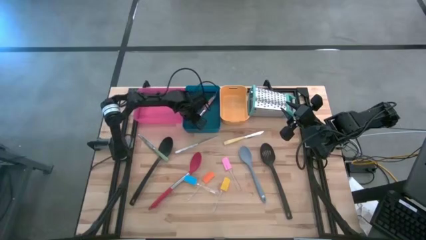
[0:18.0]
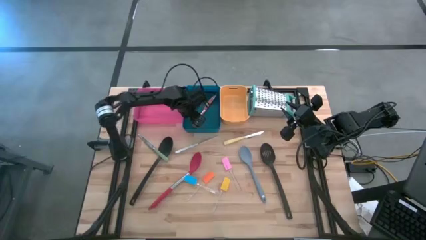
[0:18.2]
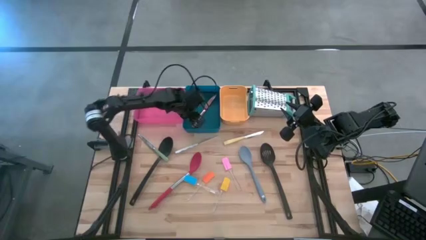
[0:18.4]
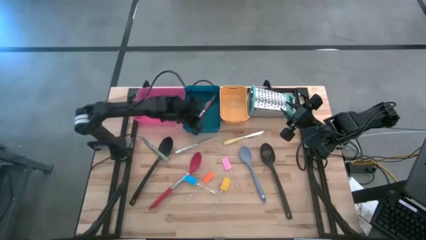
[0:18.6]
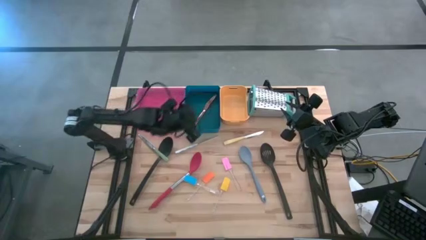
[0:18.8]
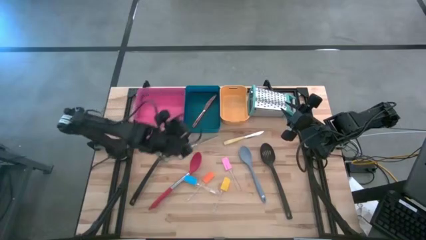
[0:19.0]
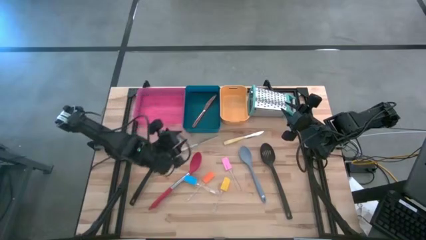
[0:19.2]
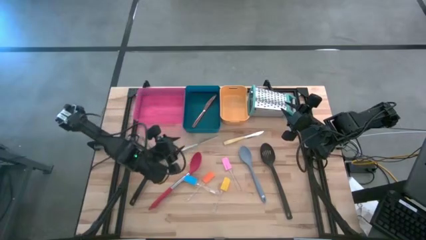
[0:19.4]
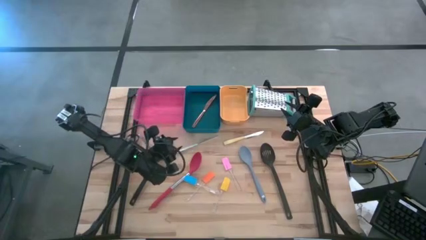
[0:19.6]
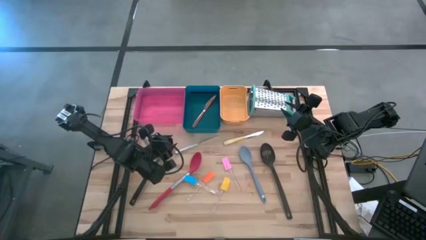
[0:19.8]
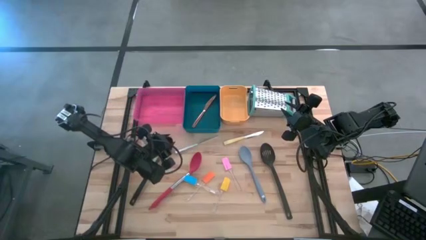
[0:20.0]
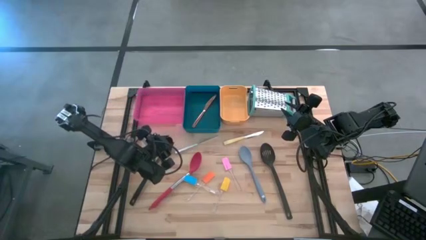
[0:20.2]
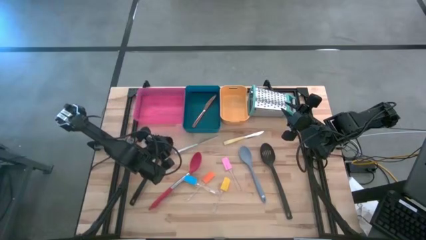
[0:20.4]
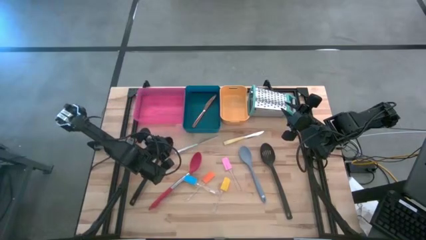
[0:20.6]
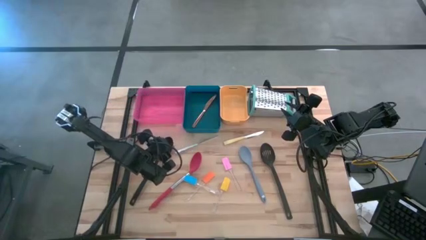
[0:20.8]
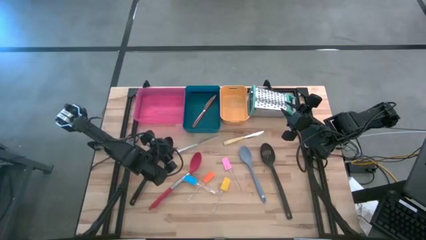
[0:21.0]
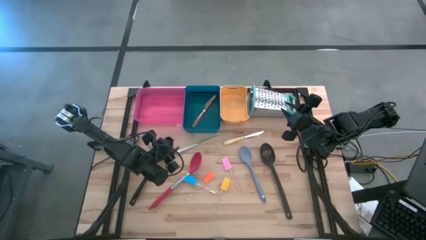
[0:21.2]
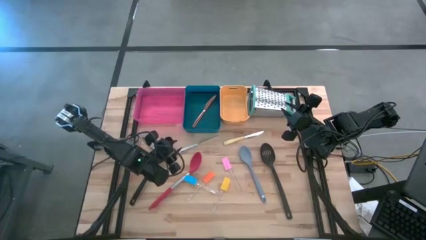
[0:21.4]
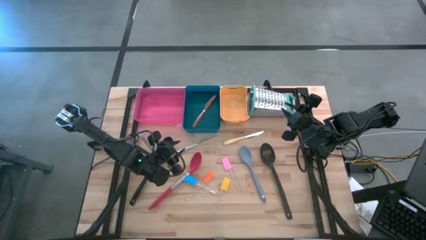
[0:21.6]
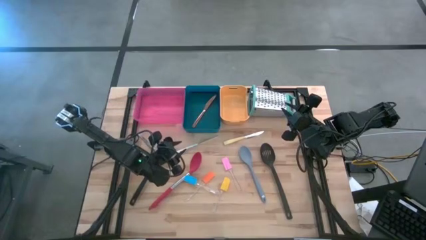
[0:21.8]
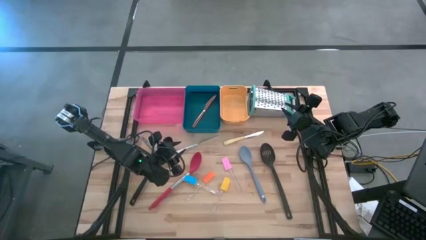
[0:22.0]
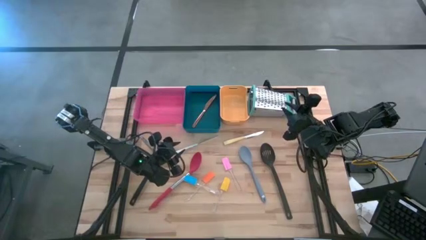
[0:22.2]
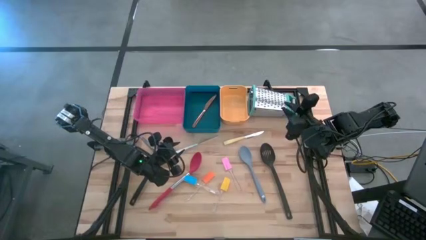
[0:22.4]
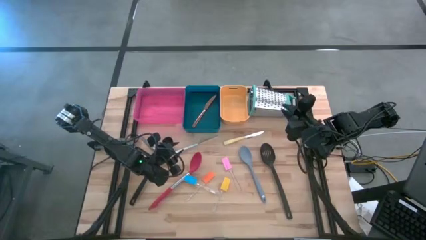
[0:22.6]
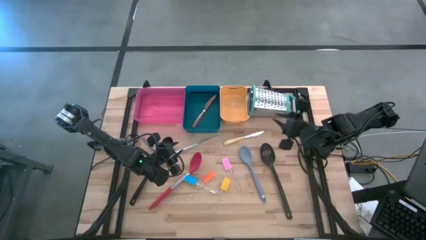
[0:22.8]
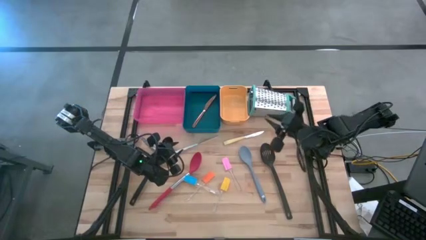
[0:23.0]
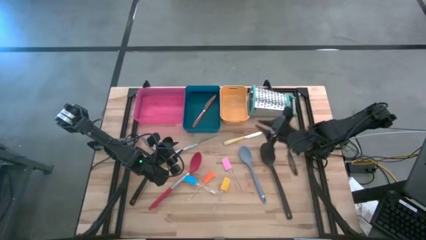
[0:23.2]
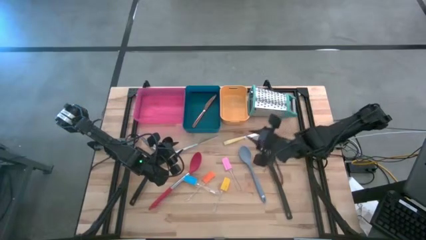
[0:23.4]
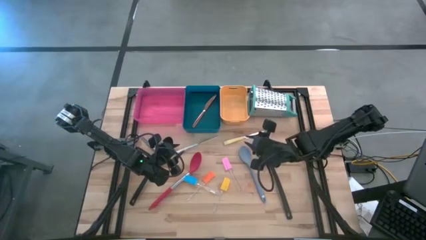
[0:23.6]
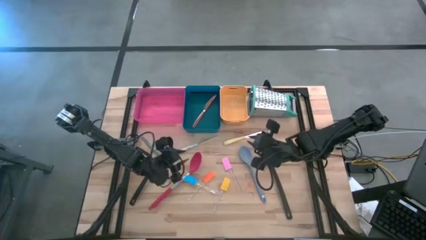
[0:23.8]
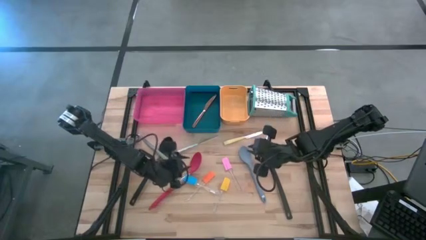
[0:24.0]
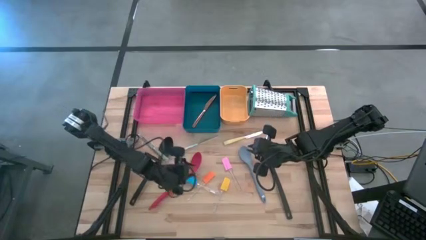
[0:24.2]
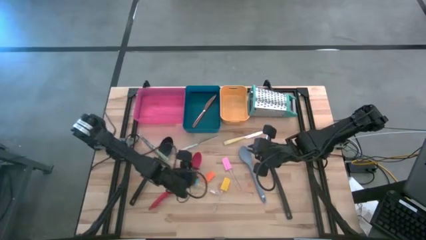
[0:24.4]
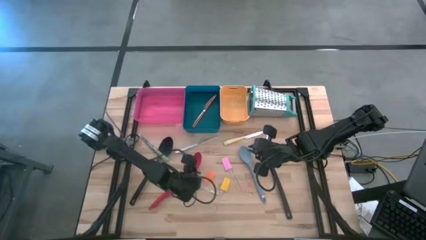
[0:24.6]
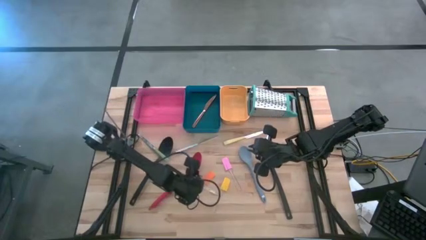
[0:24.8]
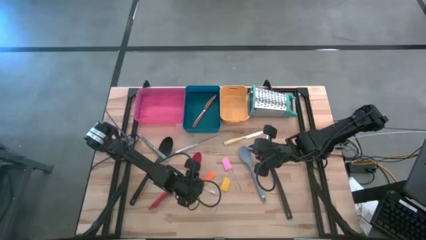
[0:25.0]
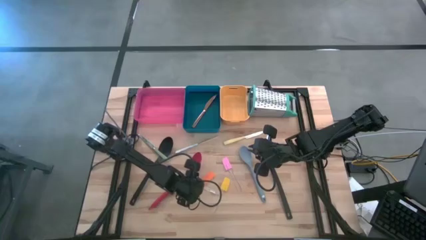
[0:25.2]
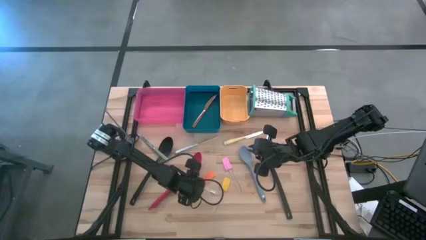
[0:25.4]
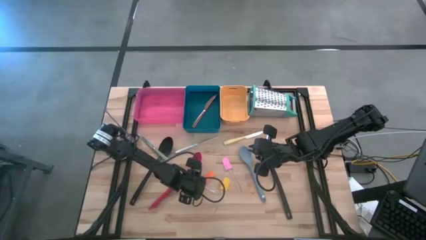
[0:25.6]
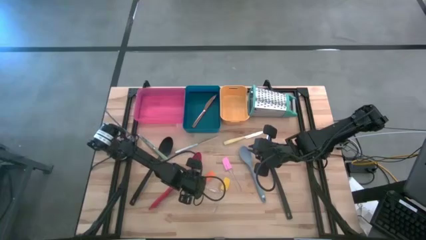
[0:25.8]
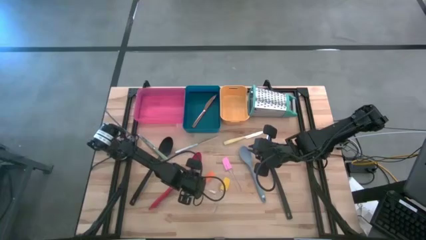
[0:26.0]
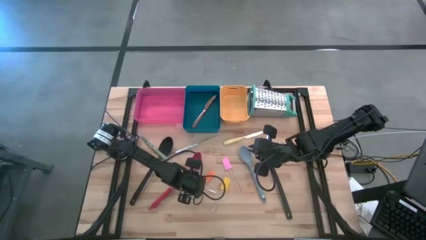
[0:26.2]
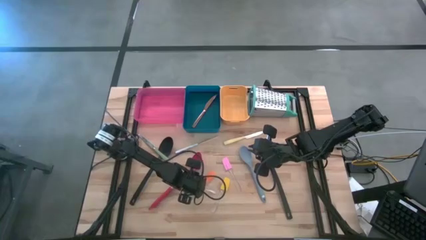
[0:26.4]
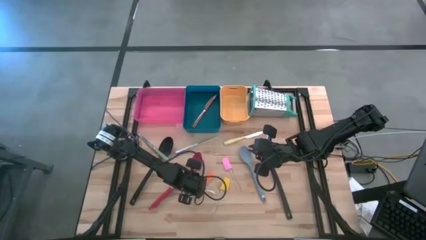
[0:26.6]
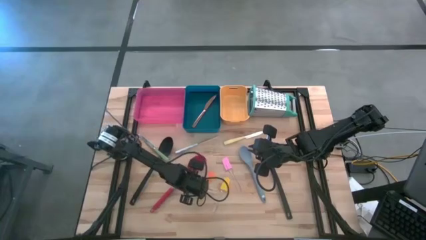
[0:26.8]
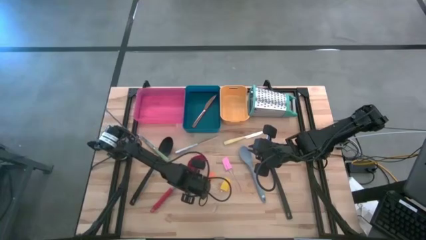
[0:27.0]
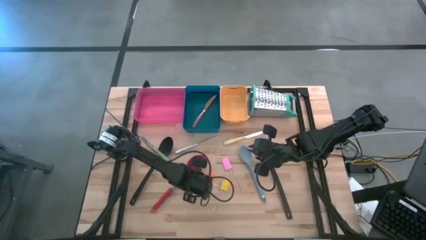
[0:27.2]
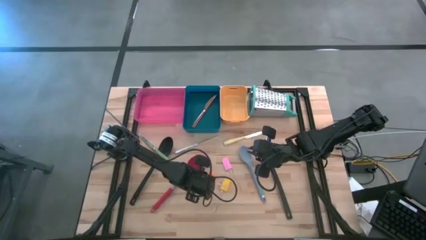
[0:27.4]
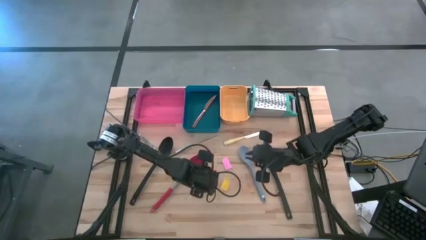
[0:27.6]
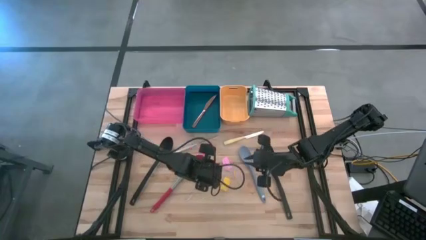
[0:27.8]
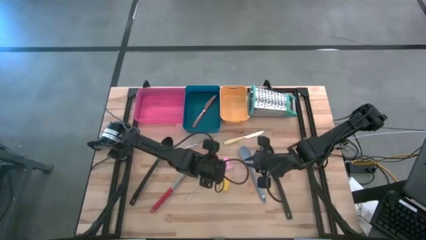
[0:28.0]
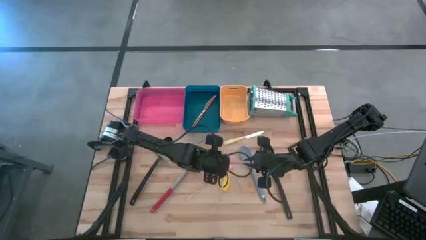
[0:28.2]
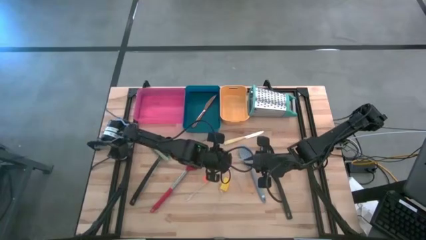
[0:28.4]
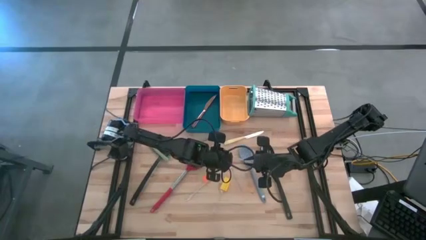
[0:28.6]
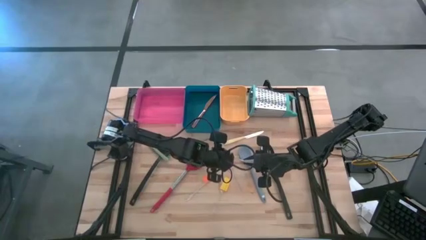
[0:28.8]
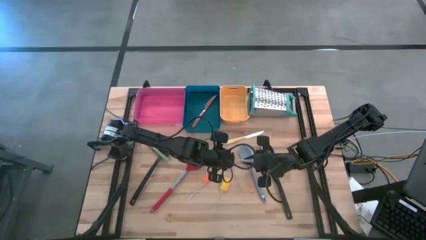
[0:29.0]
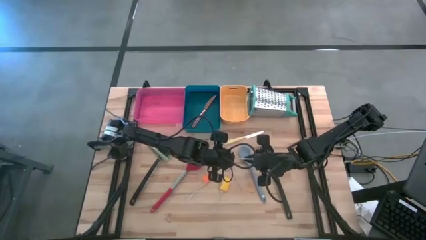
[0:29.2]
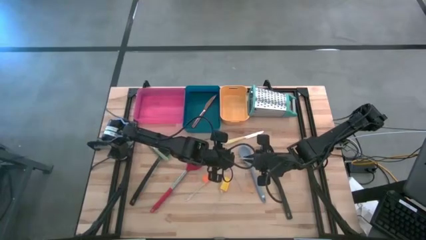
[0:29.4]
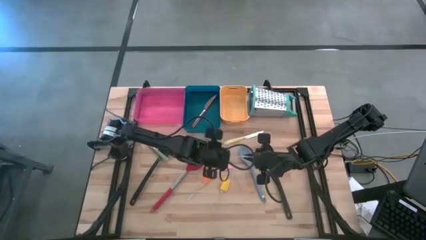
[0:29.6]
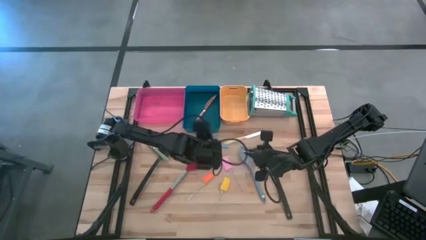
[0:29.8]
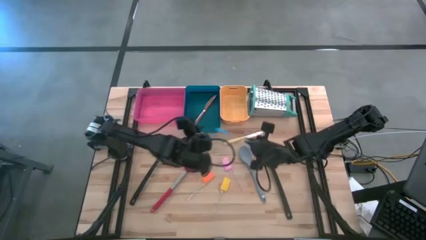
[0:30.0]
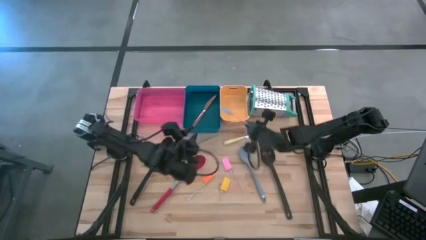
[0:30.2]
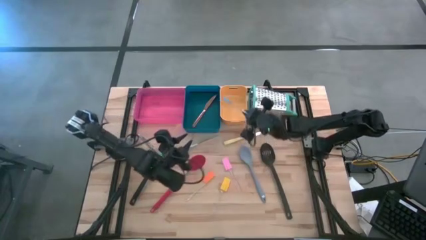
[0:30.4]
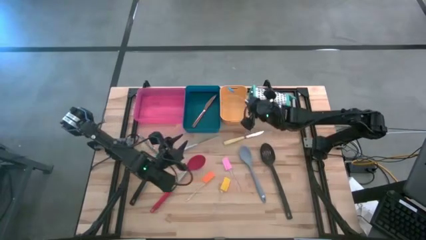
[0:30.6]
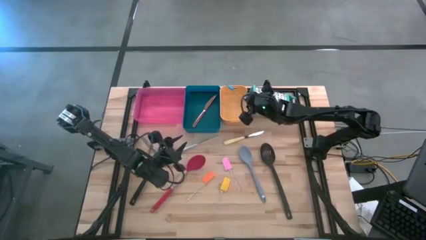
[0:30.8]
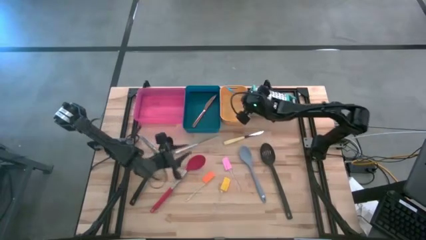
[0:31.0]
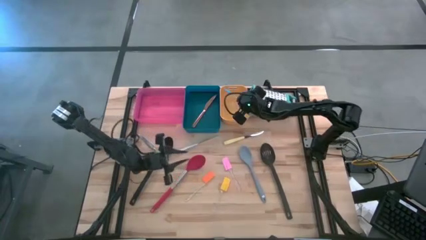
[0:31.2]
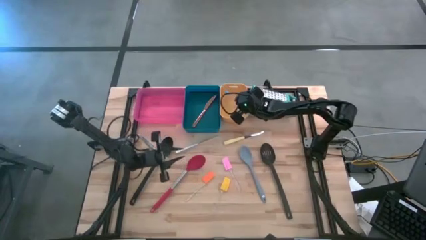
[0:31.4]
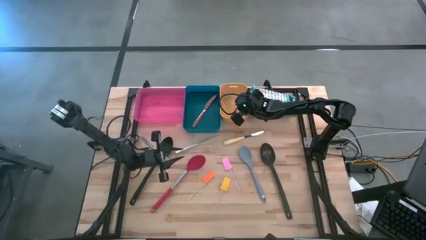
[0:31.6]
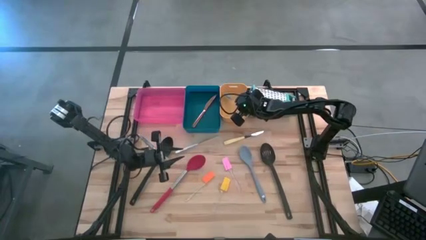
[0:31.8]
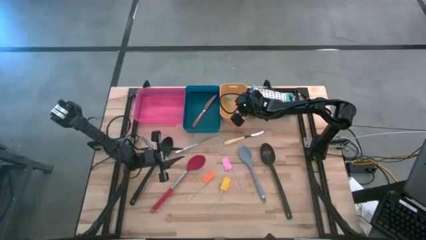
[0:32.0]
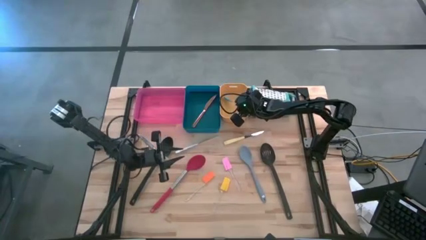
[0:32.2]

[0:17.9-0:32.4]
Task: Pick & Place Kitchen Items
Put the blue spatula into the yellow bin
